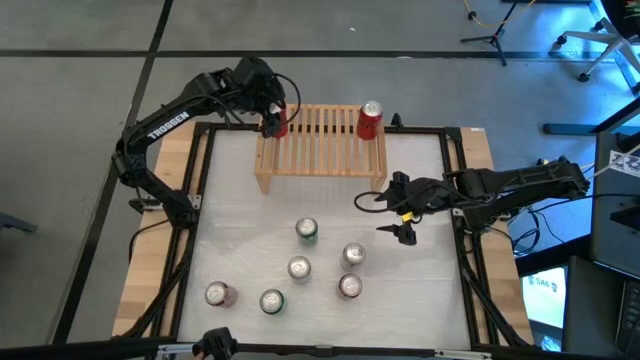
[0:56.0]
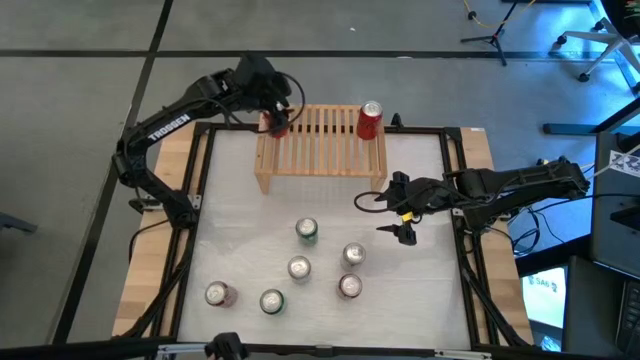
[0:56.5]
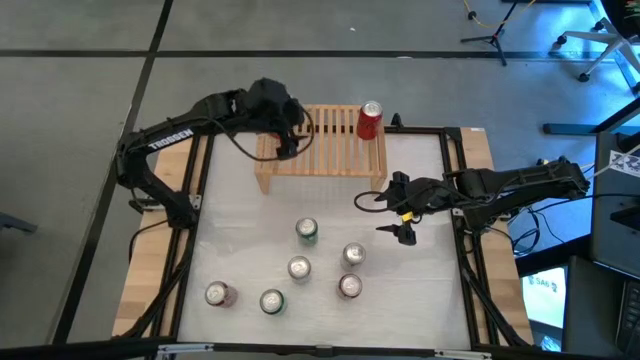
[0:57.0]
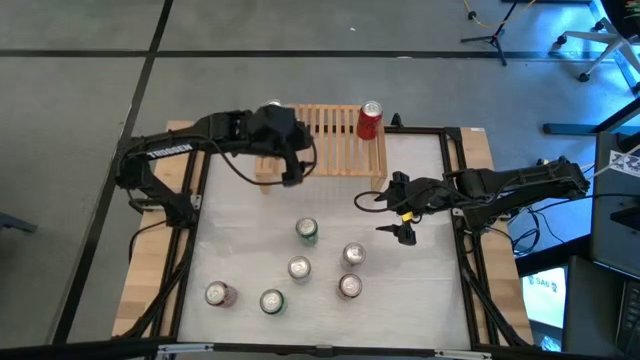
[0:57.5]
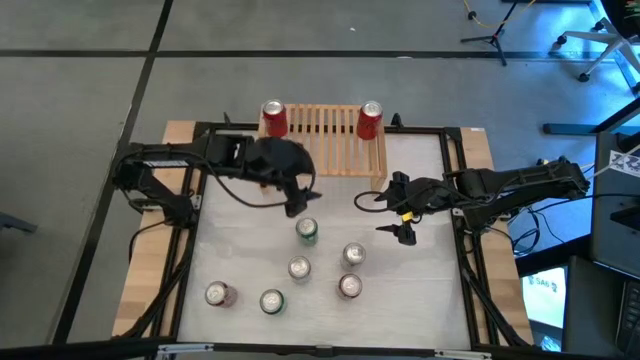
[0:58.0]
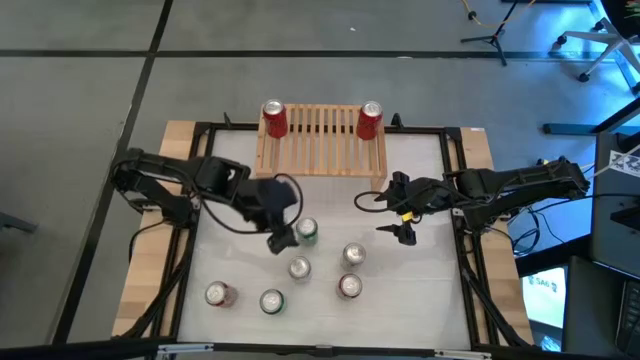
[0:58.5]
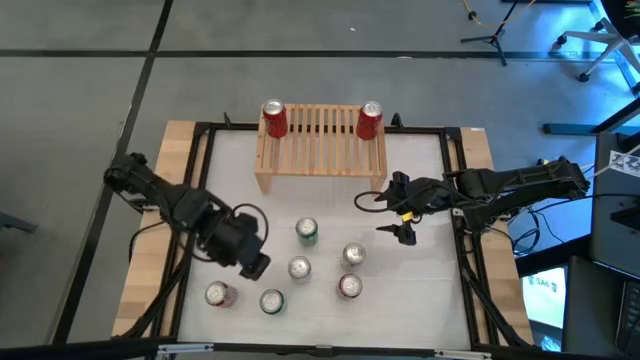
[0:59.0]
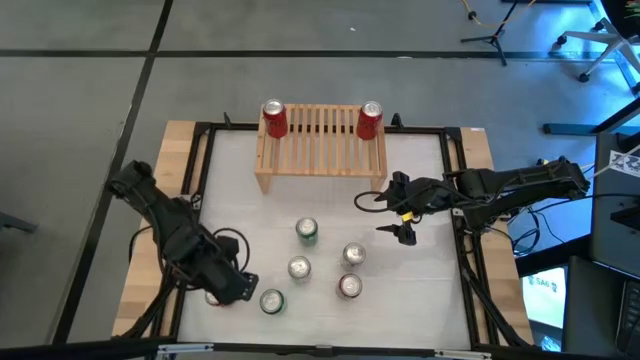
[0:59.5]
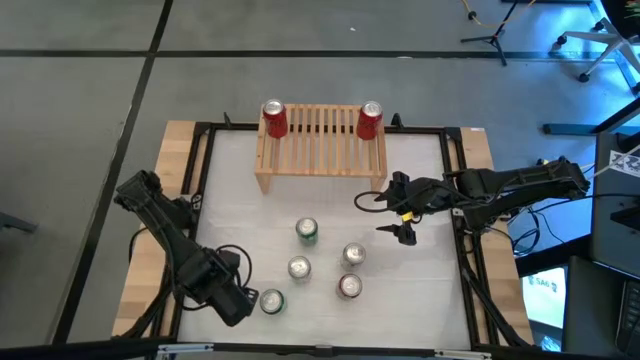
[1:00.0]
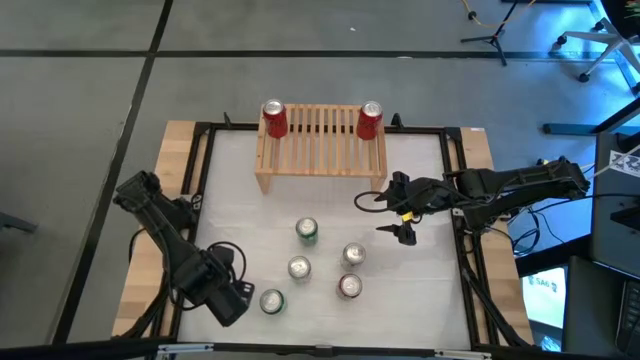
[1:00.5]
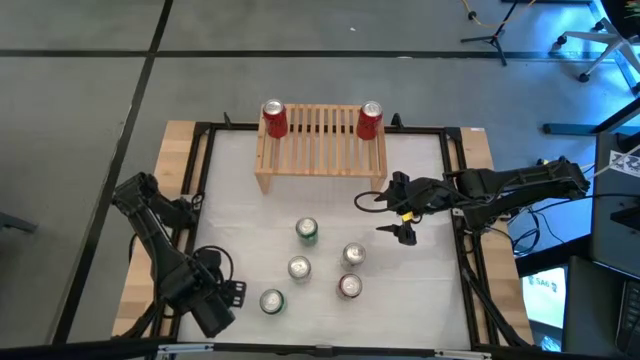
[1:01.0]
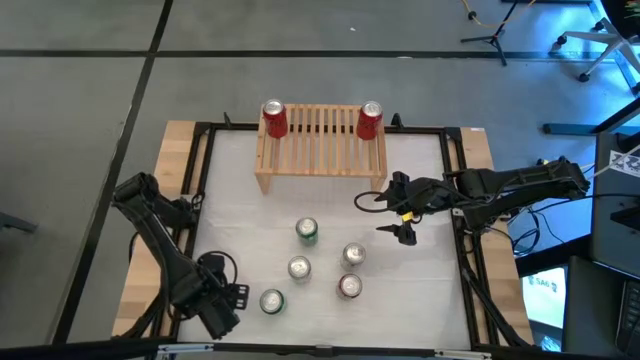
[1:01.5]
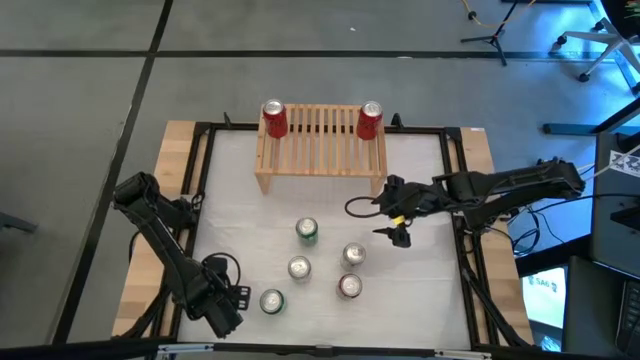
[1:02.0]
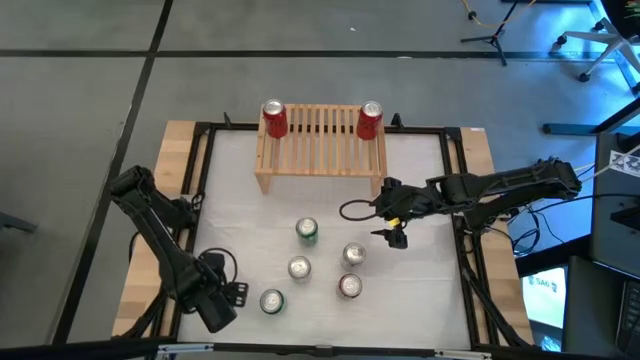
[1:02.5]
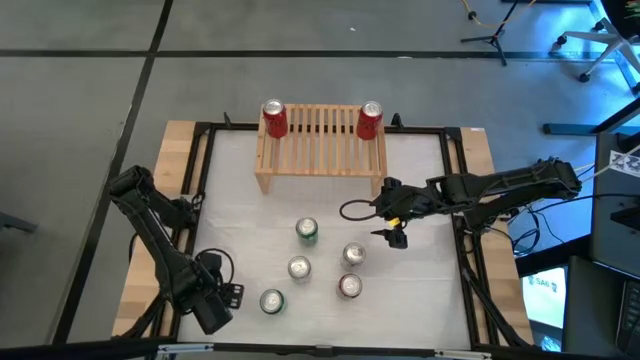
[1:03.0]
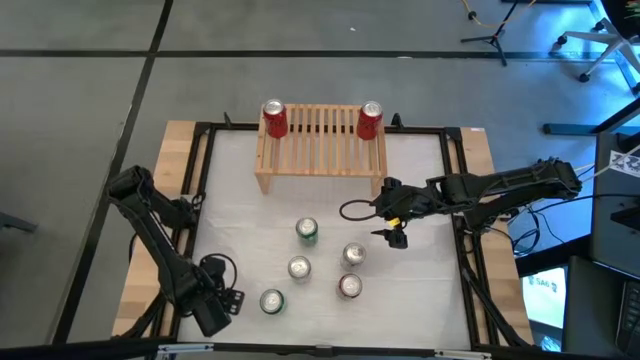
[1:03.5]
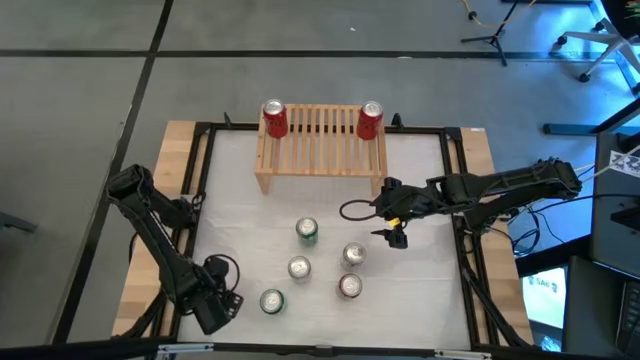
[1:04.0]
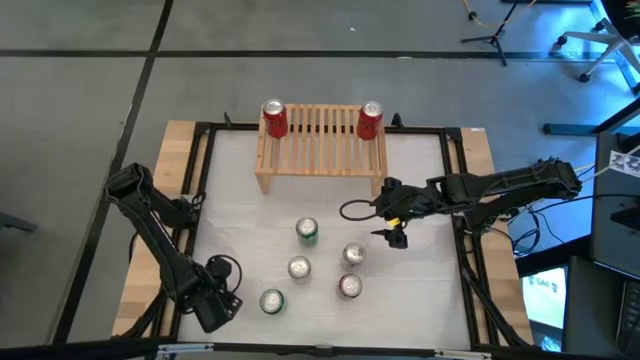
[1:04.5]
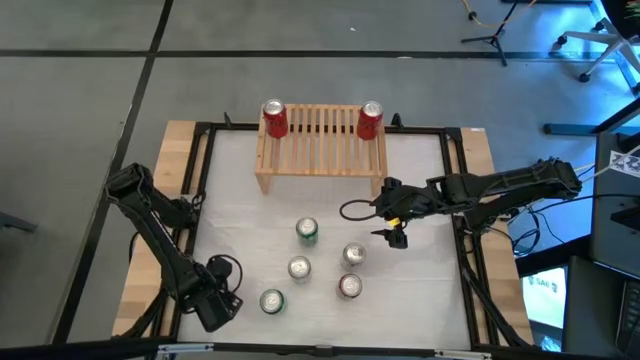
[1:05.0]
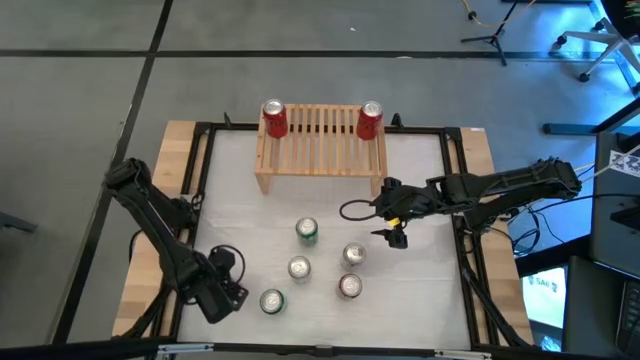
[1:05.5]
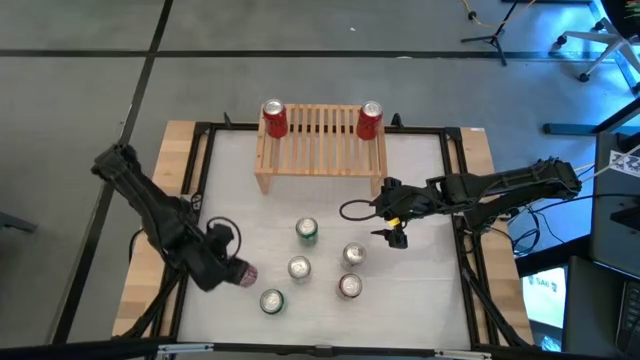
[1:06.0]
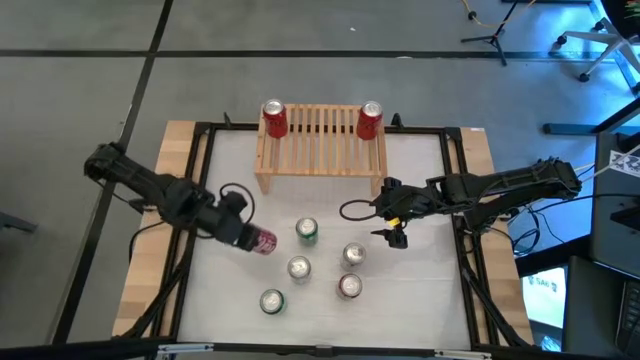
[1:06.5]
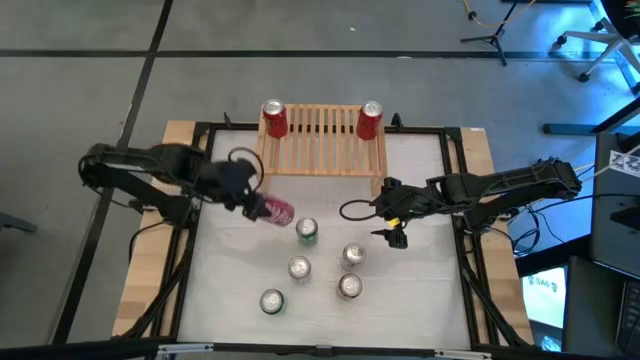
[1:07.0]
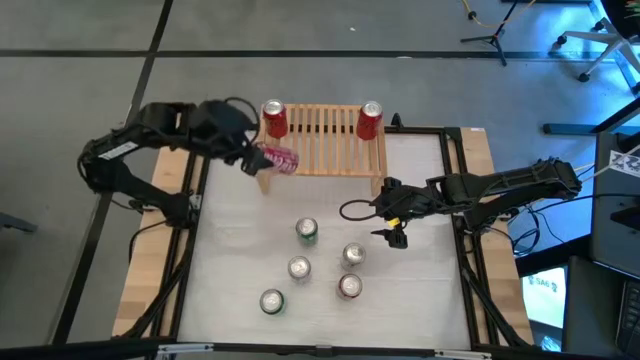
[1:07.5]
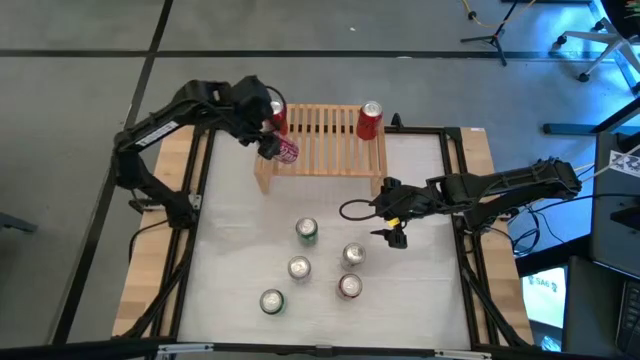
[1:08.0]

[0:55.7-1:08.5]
Task: Place canned beverage on shelf
Put the left red white soda can on the shelf

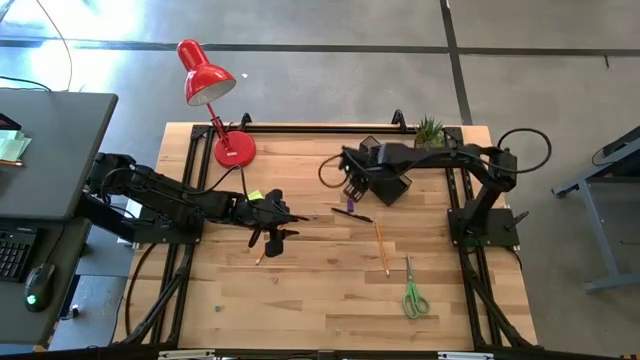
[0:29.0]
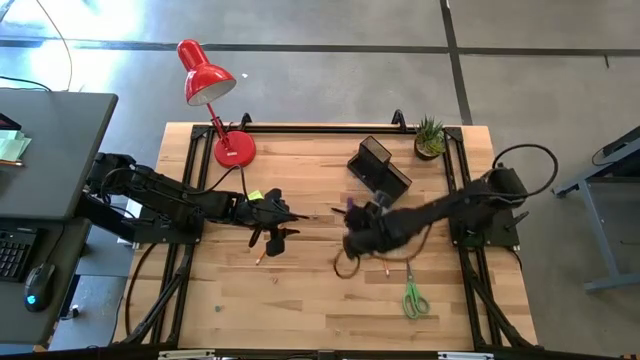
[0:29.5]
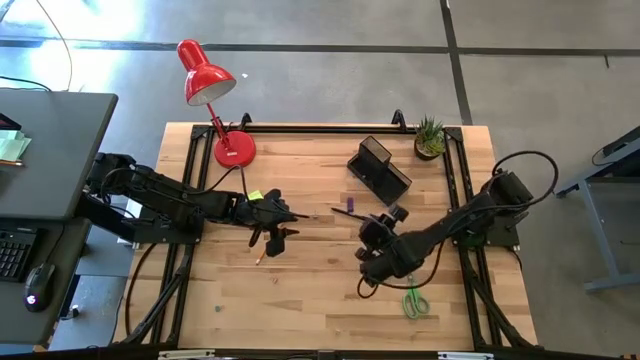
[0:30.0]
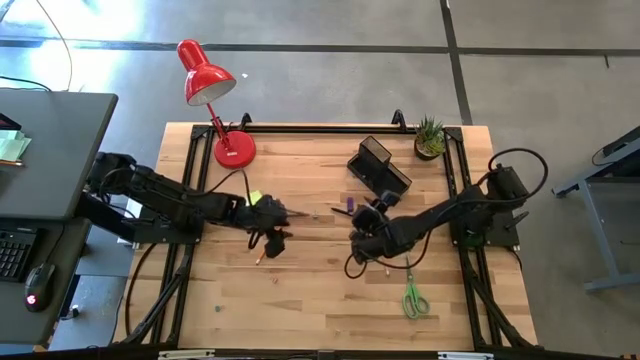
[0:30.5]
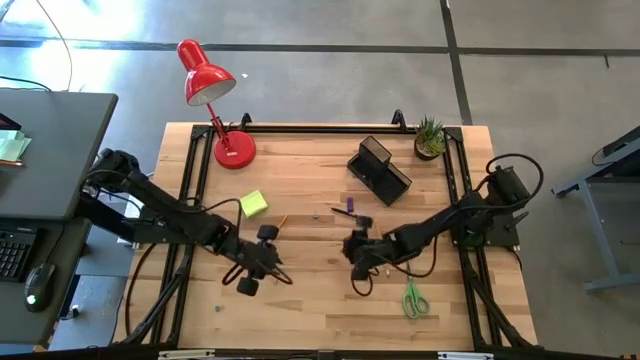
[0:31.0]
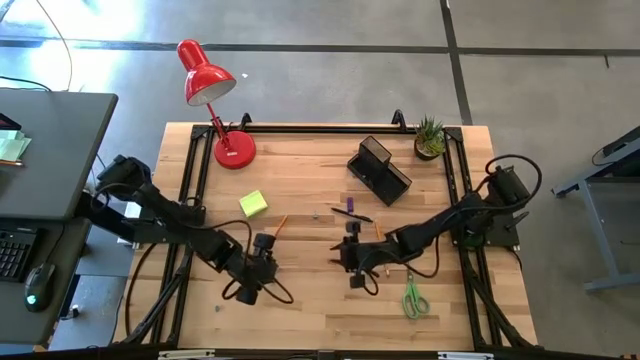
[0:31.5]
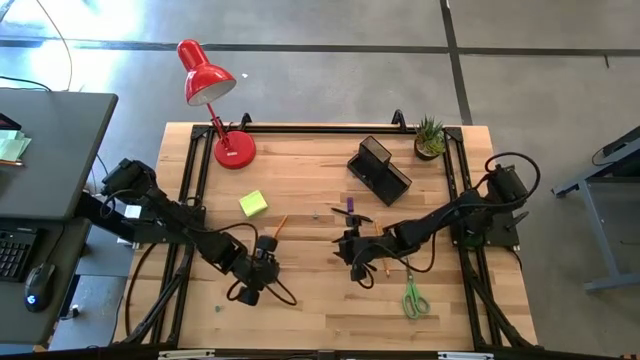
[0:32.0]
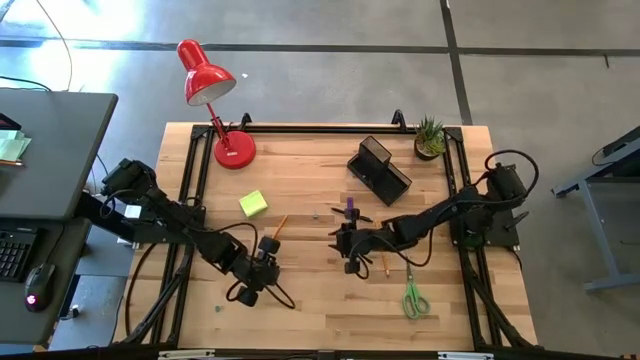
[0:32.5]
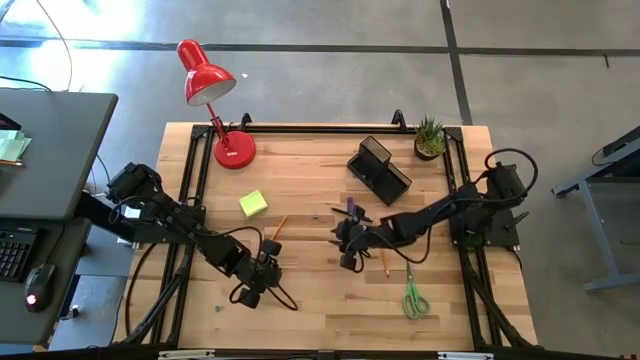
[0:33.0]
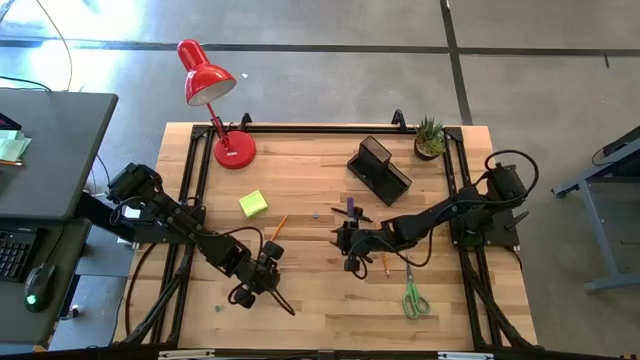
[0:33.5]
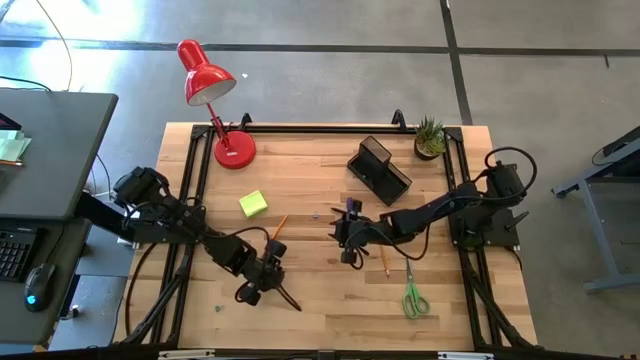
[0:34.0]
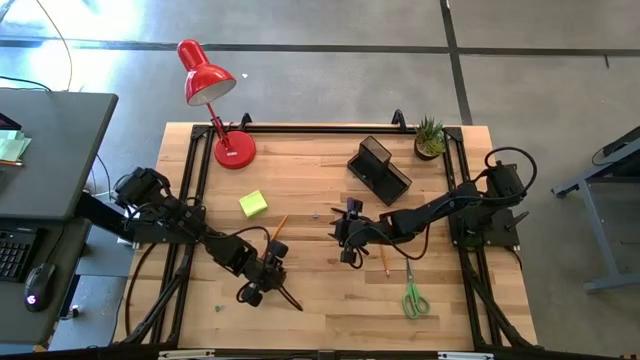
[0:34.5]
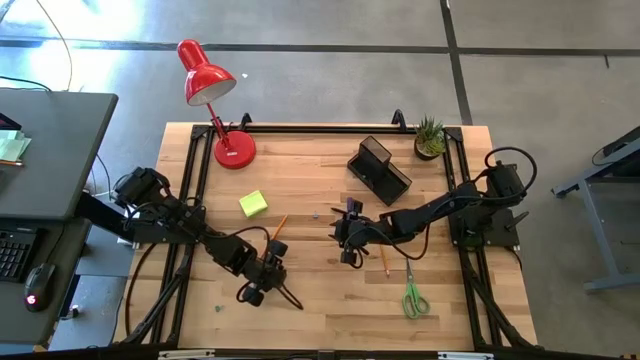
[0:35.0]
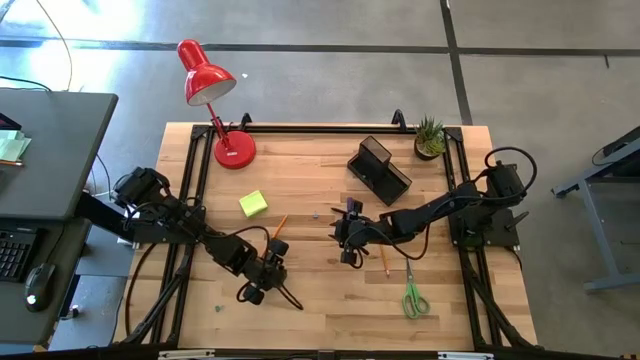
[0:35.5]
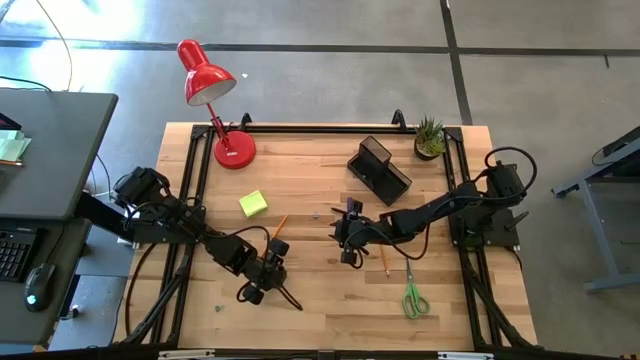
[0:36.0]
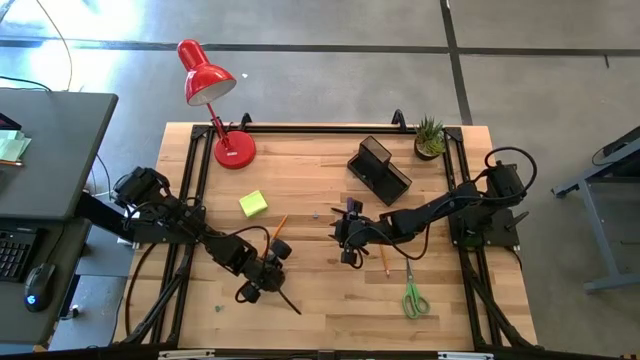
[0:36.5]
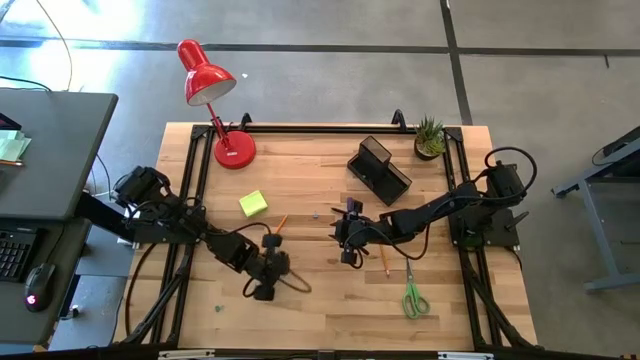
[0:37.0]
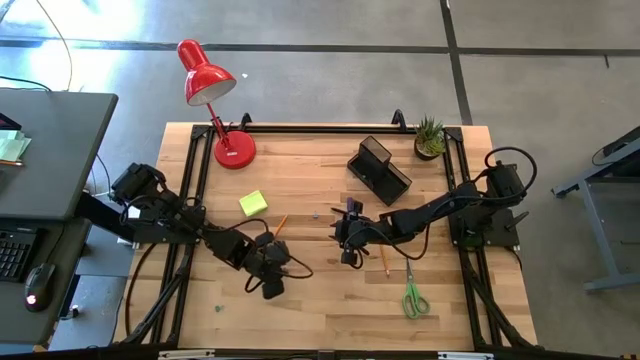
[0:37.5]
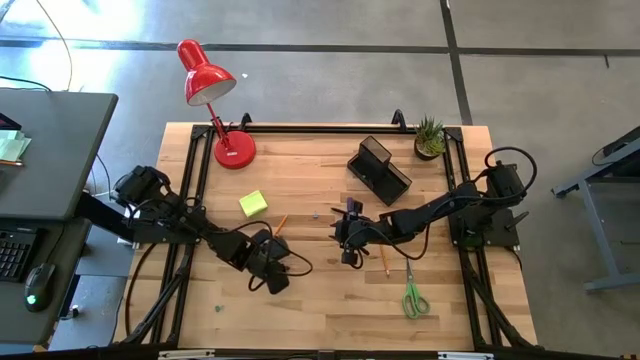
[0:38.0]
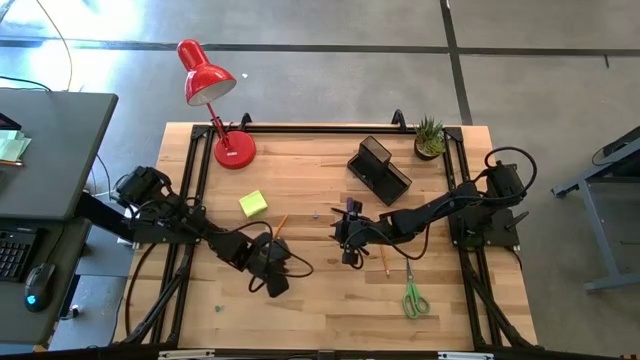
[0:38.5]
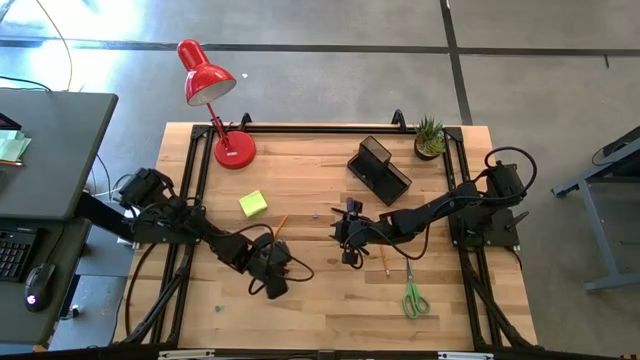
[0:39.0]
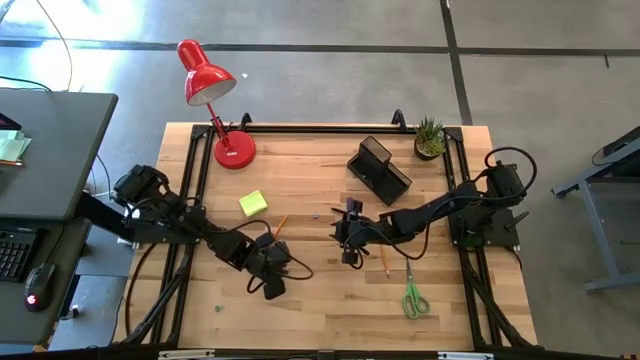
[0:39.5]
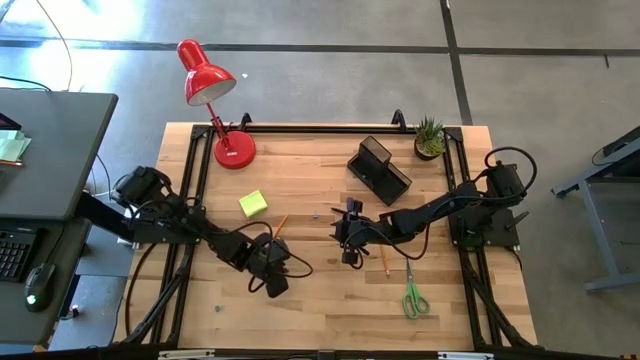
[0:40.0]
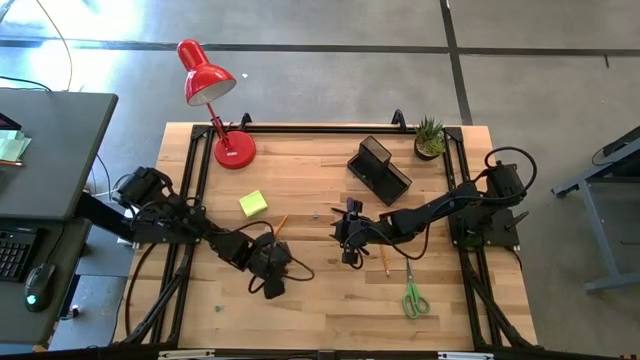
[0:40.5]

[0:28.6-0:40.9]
Task: Pick and place office supplies into organizer
Put the pink binder clip into the black desk organizer
